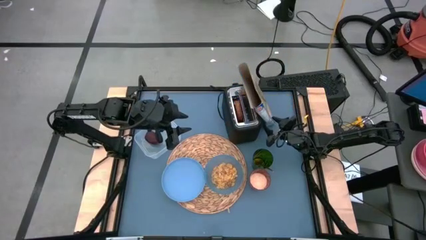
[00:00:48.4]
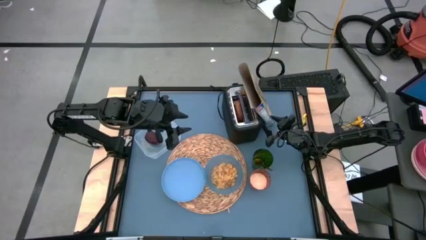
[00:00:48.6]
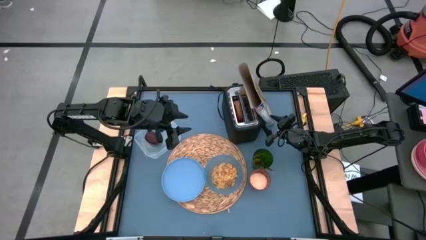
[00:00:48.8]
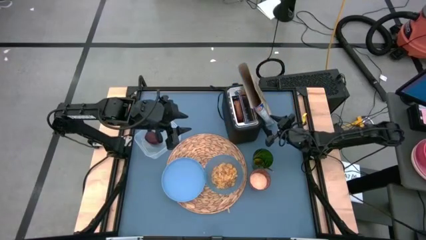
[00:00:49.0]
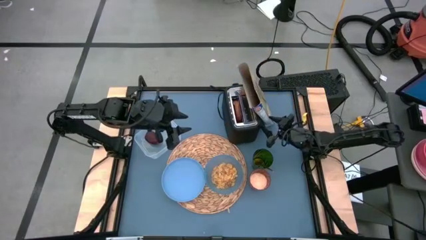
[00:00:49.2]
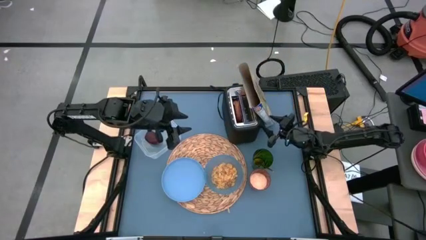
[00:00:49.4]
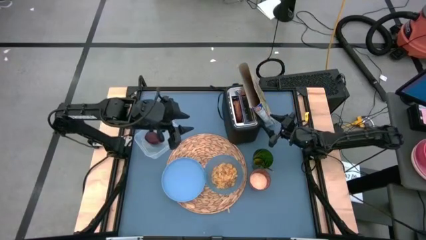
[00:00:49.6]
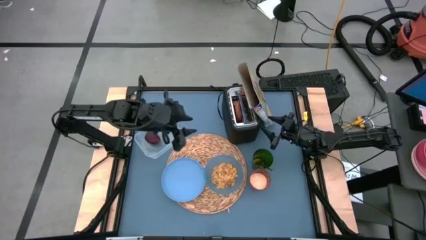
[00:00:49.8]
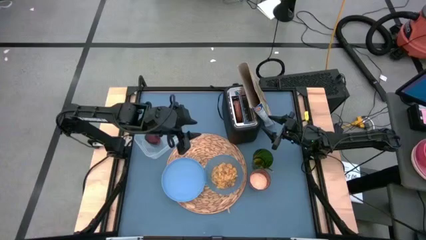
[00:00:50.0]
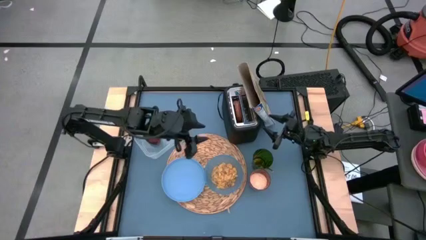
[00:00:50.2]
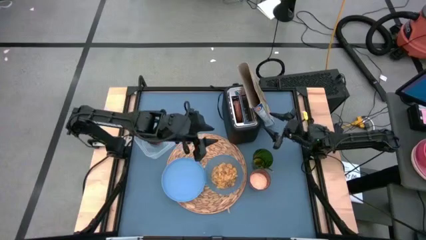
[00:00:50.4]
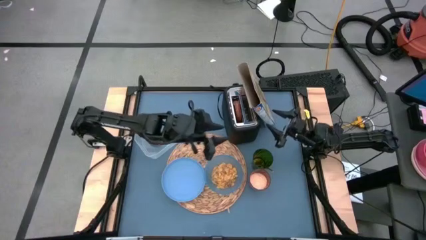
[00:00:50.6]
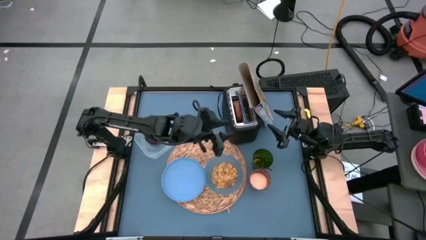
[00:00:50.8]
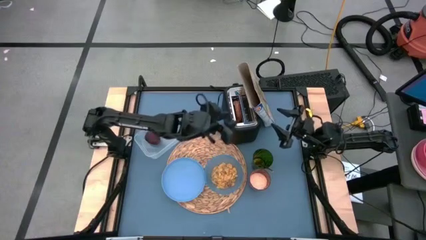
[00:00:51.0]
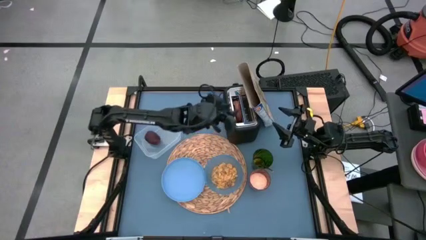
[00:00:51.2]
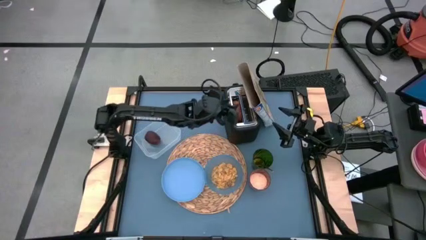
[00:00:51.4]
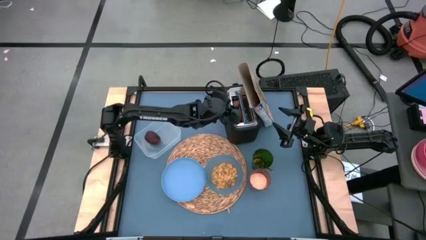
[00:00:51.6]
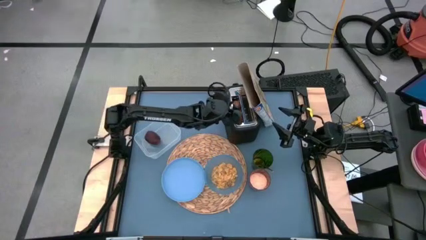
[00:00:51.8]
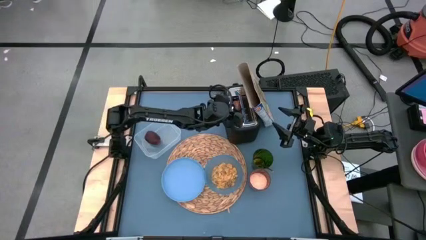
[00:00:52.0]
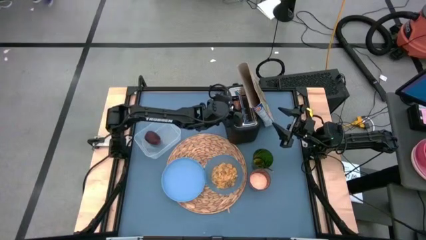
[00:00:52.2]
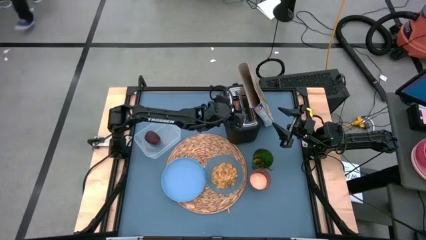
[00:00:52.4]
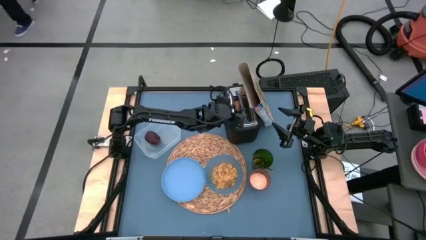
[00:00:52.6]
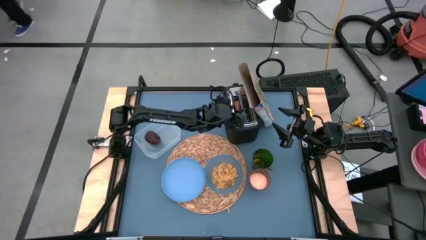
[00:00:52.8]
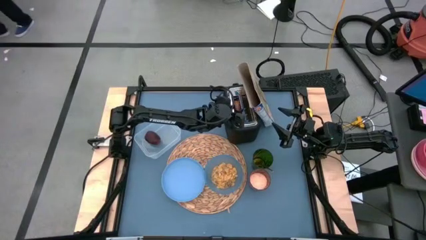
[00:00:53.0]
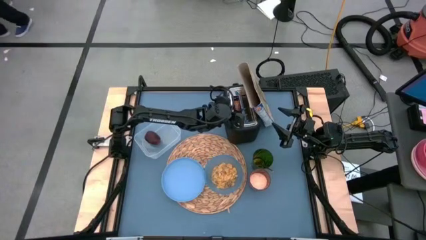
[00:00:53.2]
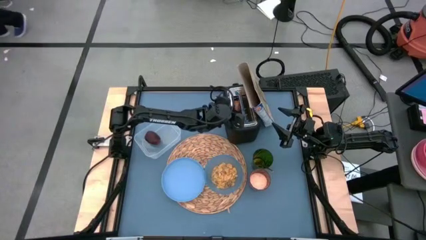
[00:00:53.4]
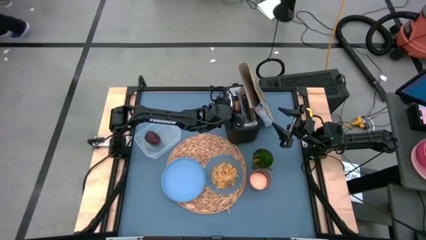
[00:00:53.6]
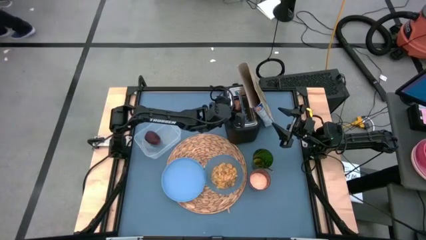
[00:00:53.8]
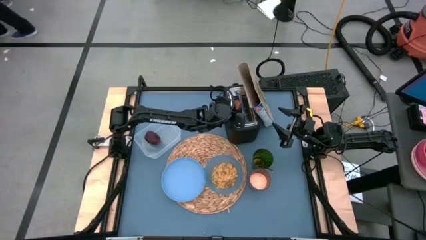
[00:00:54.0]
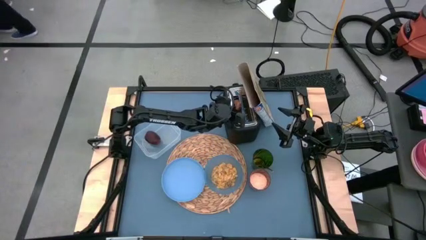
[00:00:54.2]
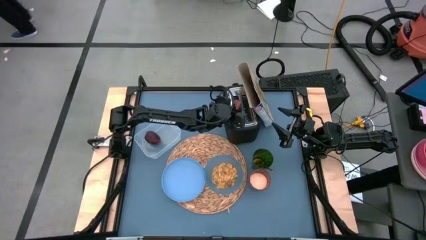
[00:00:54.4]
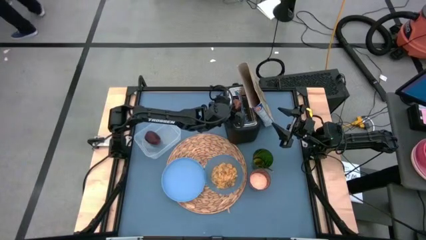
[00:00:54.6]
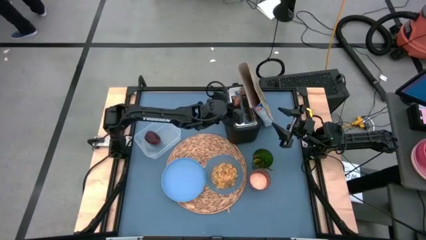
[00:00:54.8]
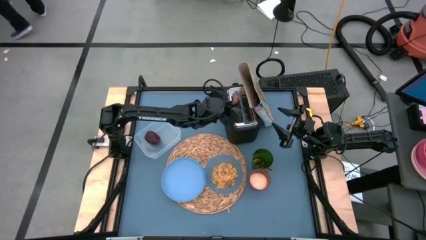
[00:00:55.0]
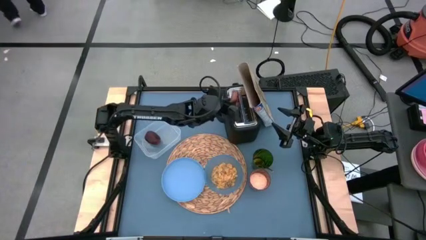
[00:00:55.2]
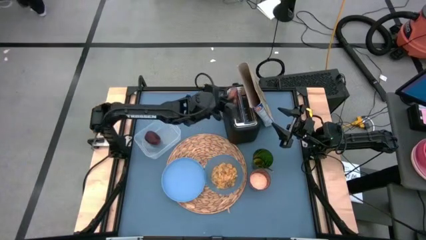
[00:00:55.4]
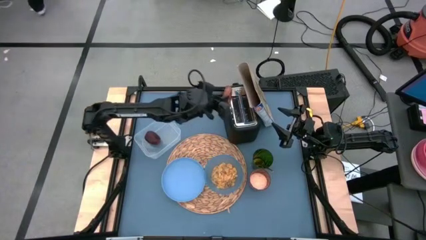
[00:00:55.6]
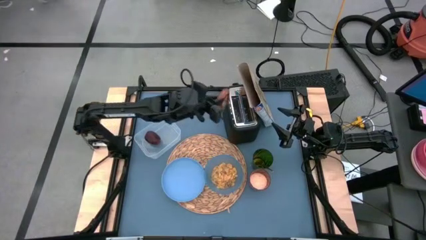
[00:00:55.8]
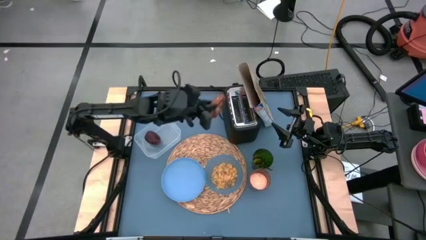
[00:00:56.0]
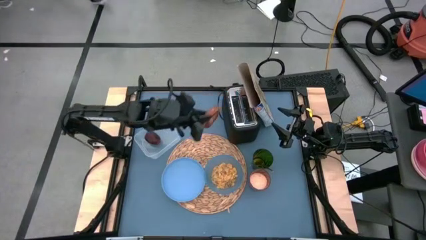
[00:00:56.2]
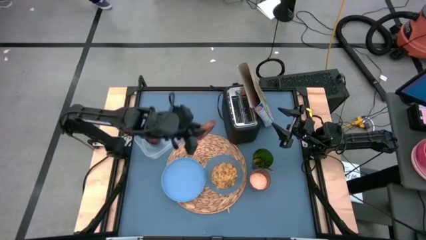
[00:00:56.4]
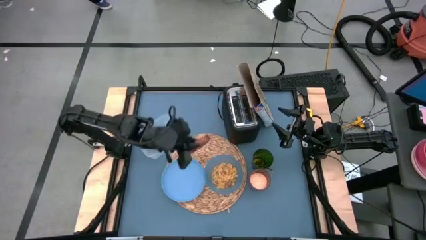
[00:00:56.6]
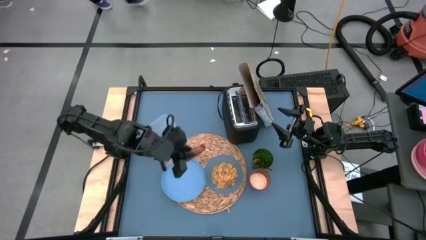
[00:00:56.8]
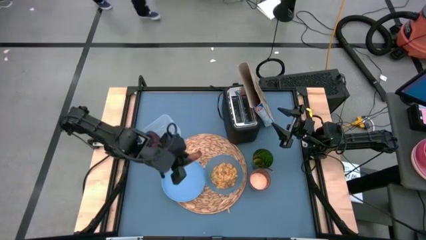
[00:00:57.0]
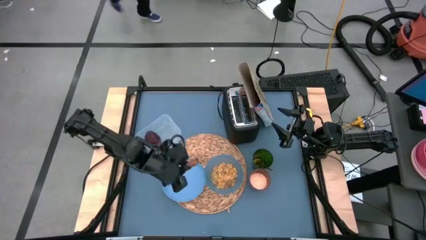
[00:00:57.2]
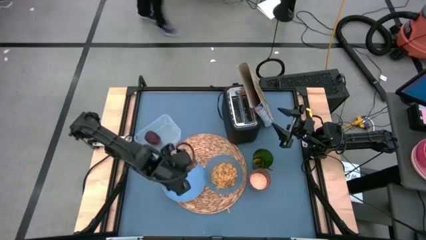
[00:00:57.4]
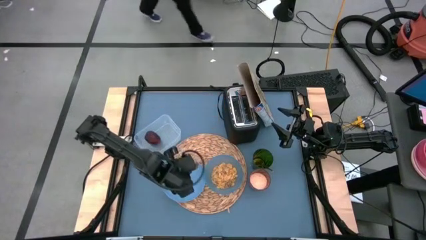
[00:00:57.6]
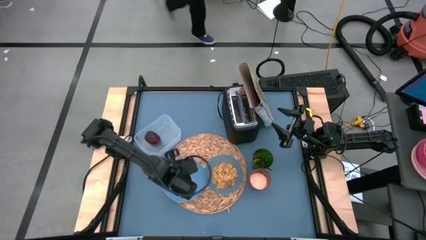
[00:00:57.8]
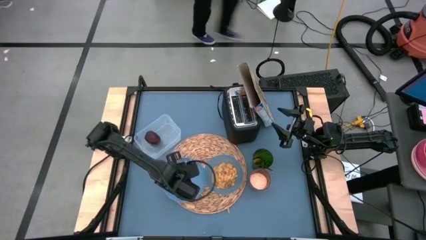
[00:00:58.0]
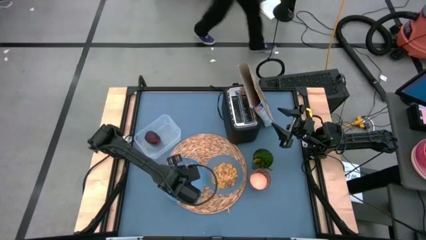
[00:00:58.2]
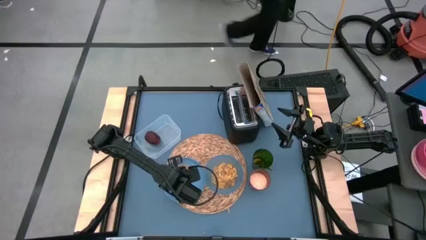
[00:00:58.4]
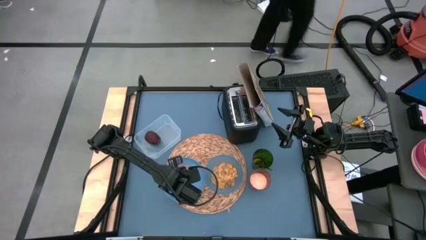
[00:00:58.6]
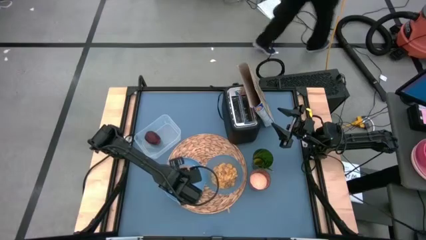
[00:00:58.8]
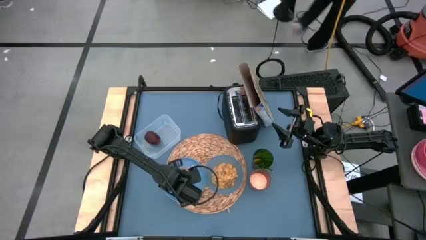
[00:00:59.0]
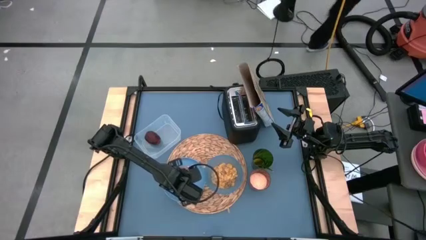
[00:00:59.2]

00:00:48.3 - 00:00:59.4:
Task: Arrange a breakfast setting
Put the toasted bread on the blue plate
